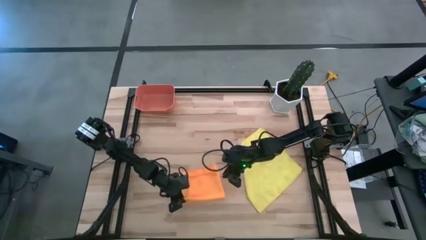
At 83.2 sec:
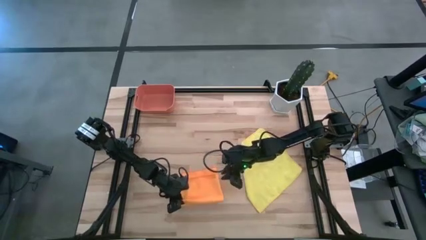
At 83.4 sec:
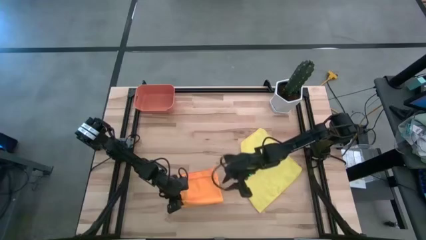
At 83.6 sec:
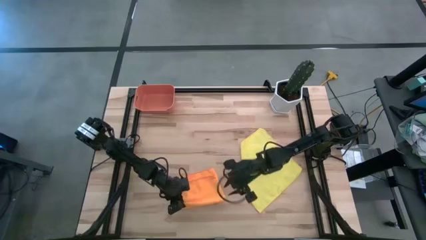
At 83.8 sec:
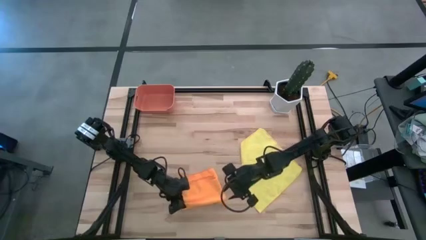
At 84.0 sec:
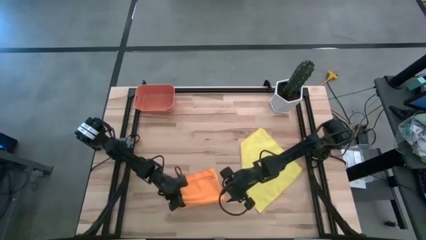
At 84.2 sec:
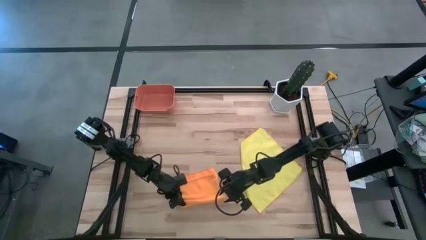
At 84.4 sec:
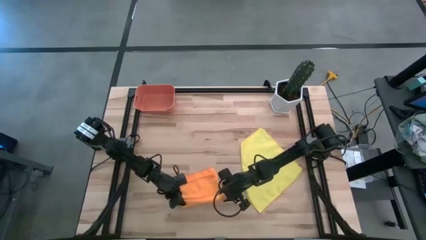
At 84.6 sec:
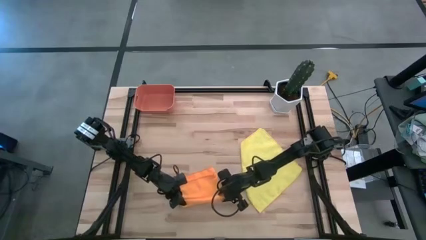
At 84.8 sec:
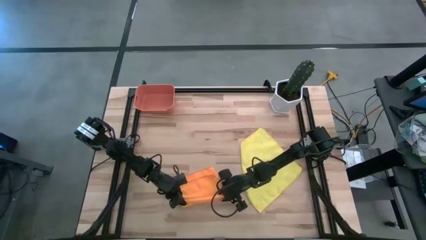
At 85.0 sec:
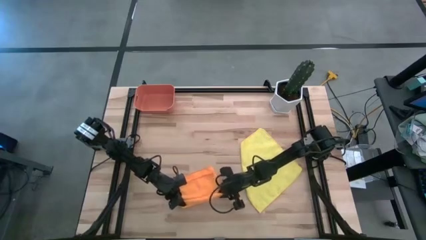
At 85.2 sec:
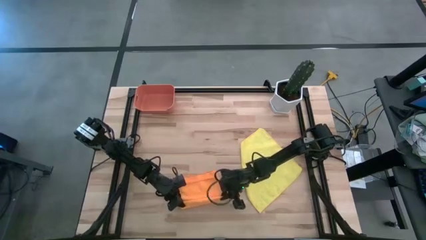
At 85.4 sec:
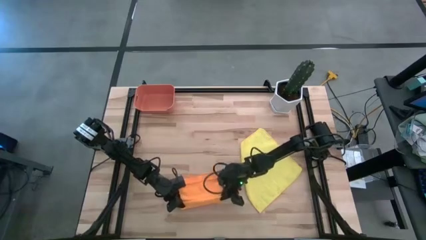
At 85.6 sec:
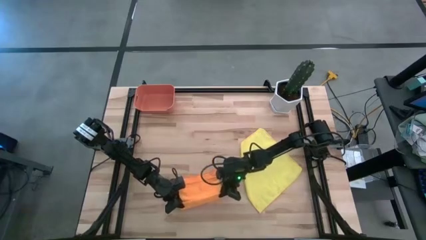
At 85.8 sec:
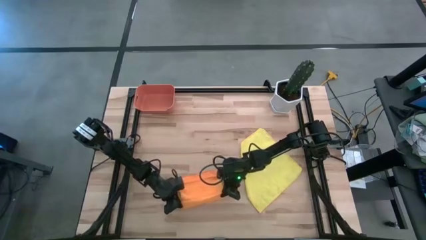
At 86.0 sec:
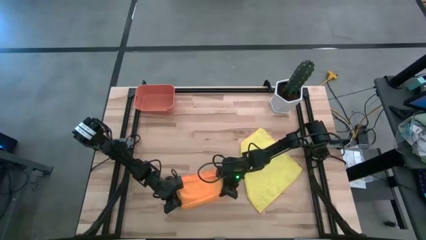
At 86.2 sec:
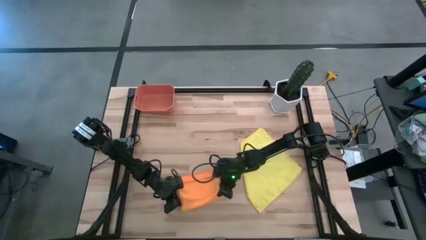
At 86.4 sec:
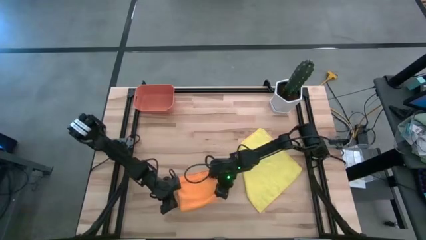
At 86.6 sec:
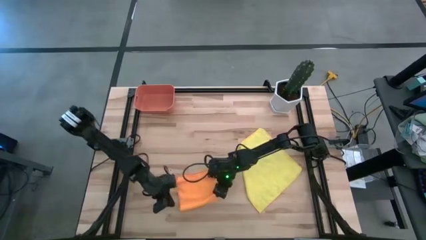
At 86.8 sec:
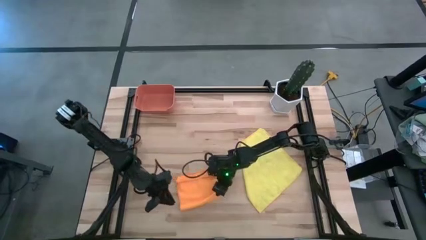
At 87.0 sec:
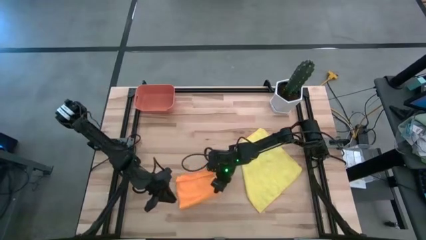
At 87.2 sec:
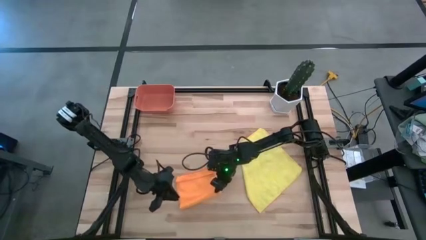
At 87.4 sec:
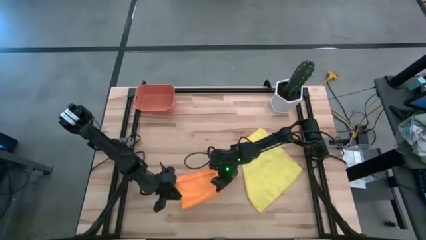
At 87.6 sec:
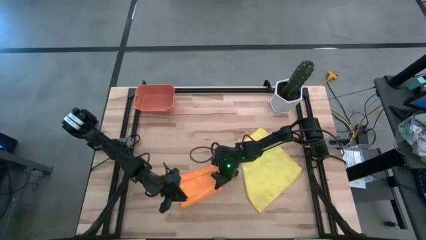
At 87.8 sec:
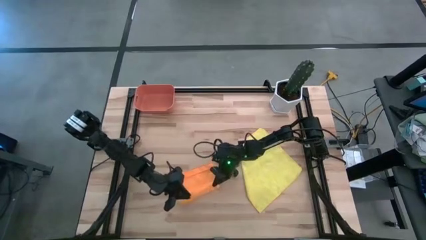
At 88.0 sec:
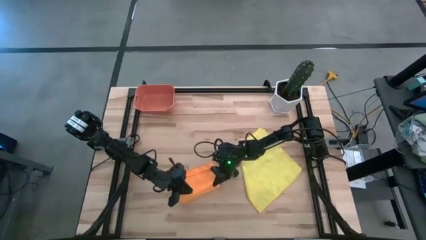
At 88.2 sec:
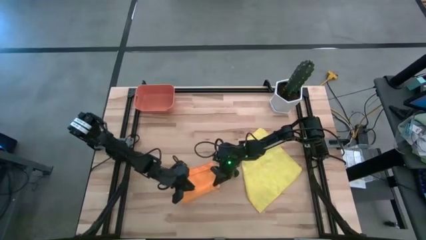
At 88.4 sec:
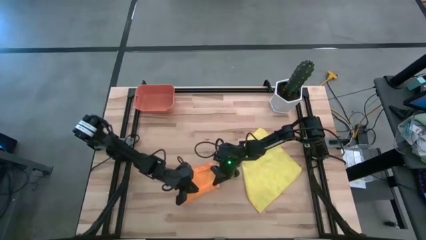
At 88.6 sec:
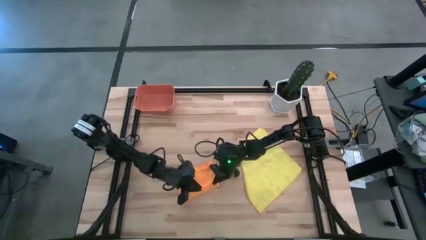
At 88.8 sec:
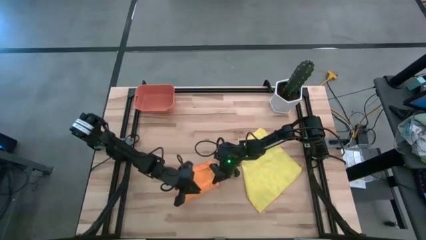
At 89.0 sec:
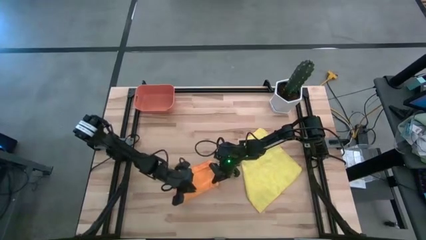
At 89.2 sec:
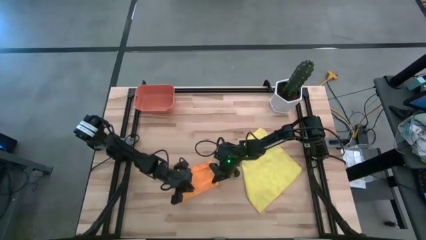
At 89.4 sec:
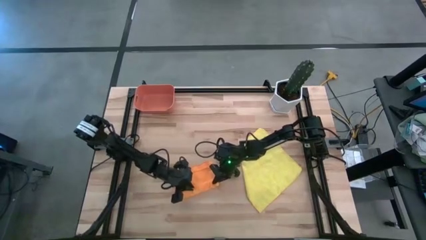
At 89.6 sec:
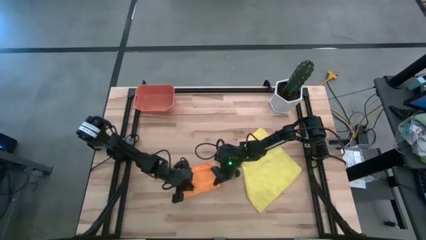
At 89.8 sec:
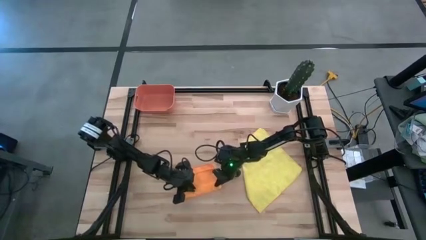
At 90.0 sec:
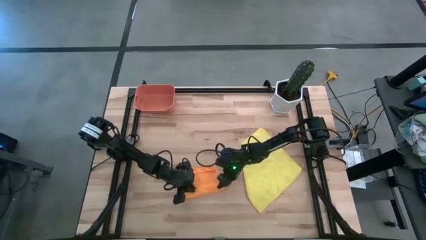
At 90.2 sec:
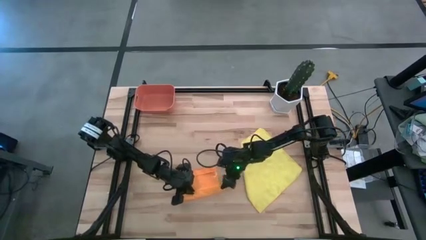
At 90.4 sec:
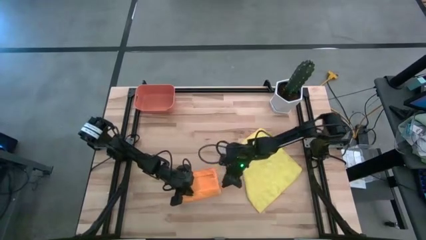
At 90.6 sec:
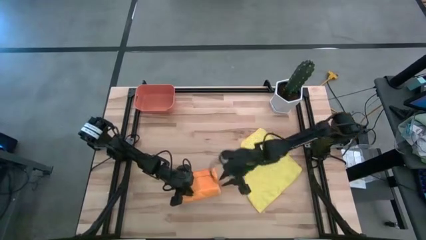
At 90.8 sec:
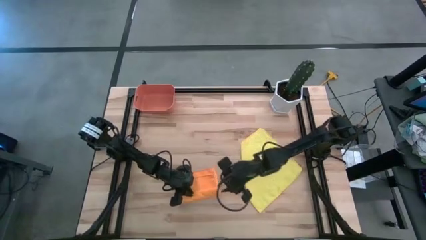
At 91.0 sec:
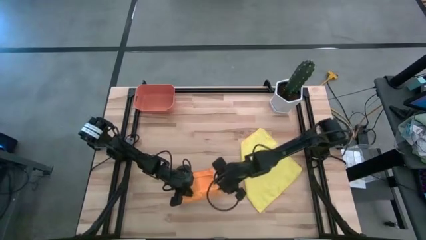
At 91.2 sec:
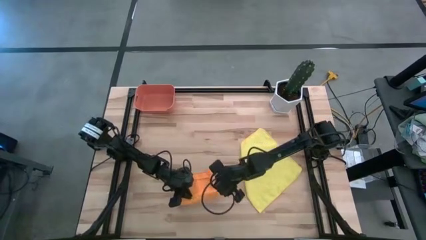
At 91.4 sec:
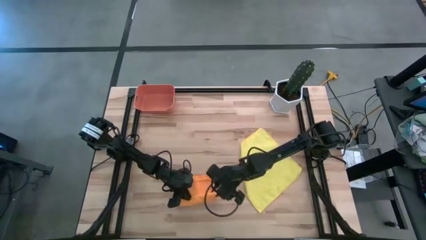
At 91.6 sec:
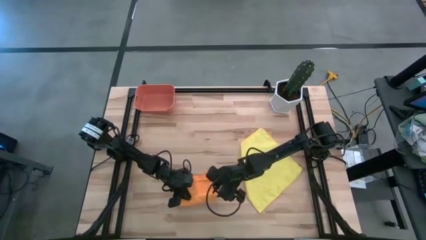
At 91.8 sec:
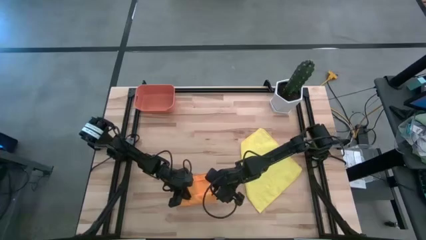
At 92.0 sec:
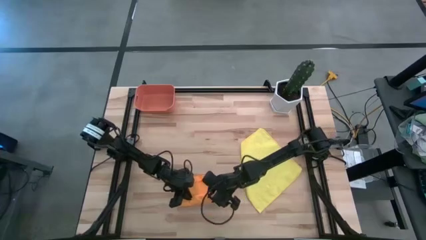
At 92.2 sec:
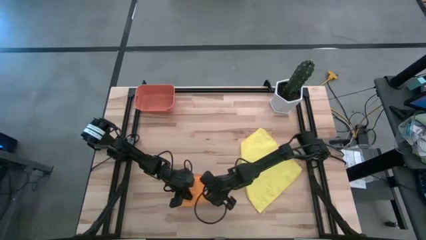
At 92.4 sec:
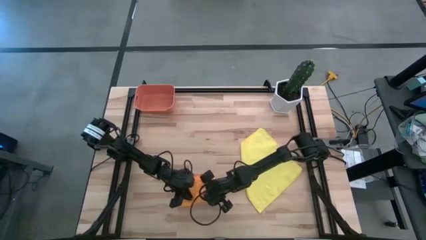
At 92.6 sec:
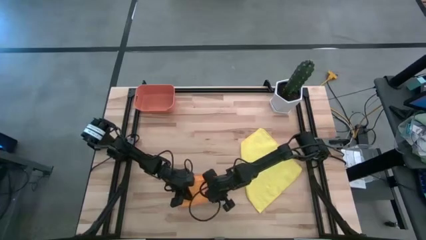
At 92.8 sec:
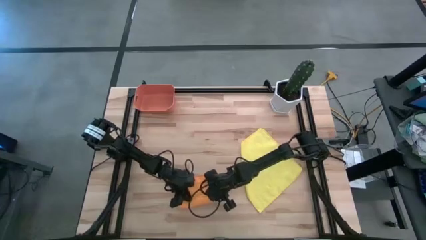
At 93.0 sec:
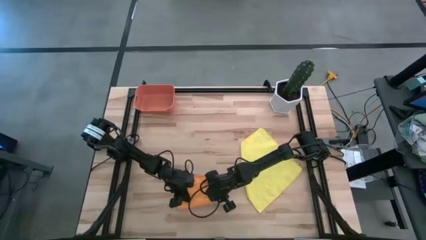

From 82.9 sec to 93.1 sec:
Task: Roll microfiber towels into tight, uniform cylinder then place into a basket
Roll the orange towel
